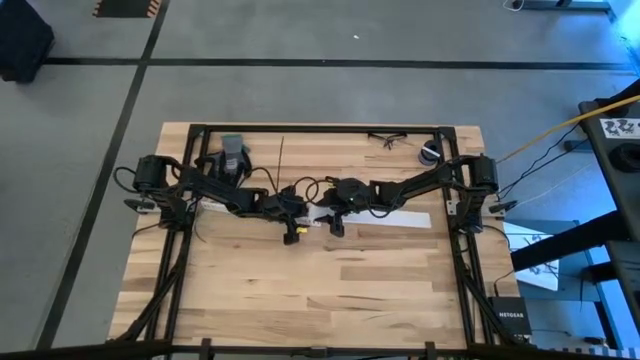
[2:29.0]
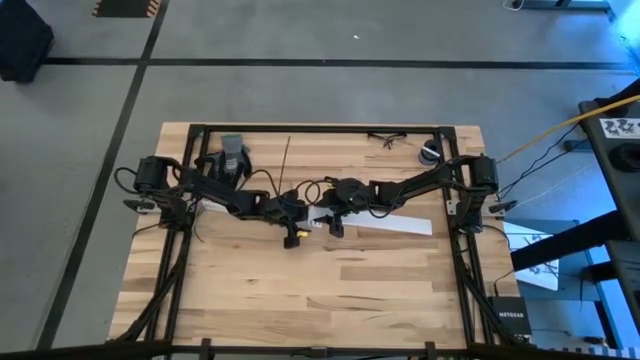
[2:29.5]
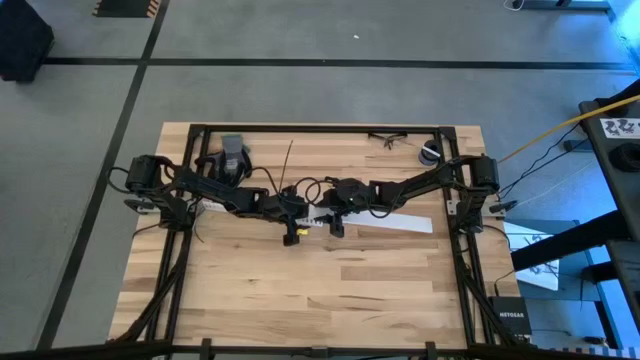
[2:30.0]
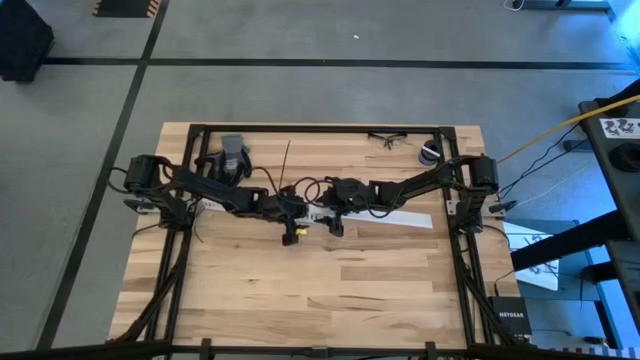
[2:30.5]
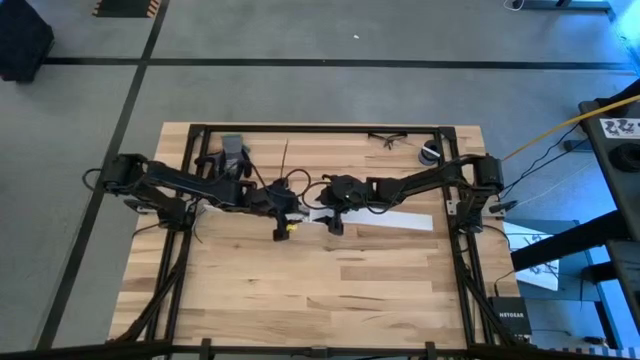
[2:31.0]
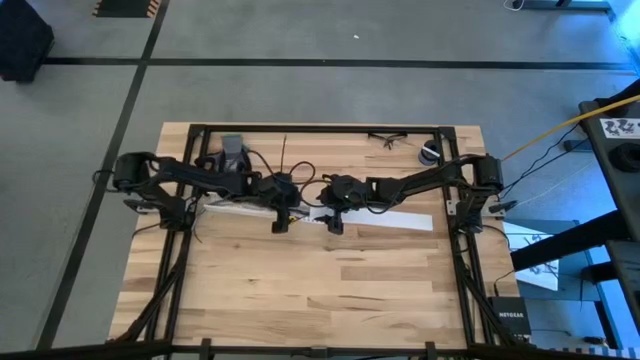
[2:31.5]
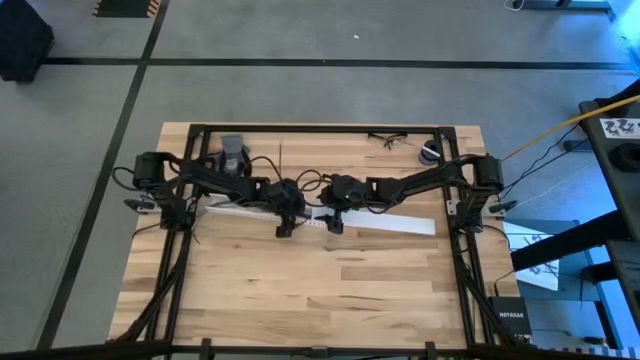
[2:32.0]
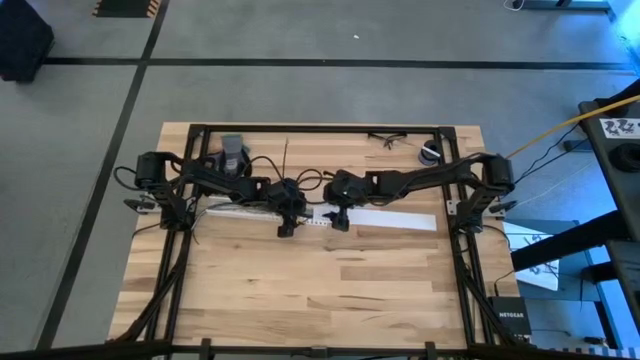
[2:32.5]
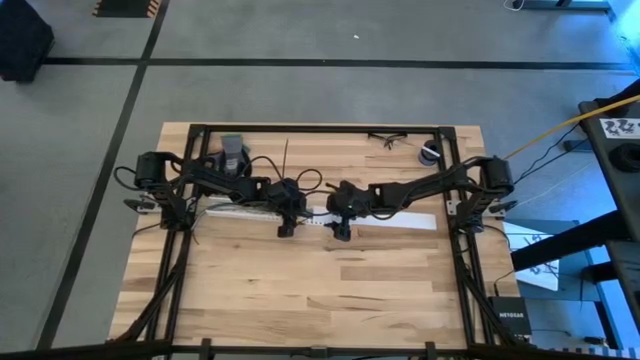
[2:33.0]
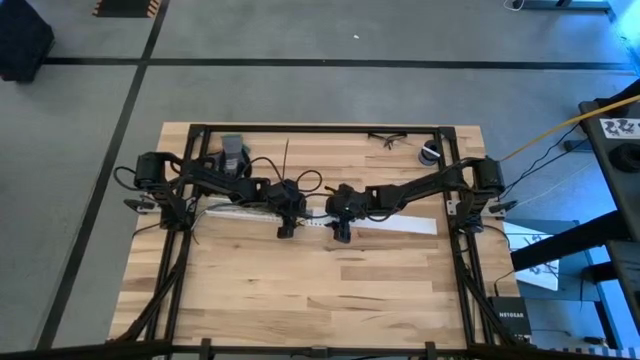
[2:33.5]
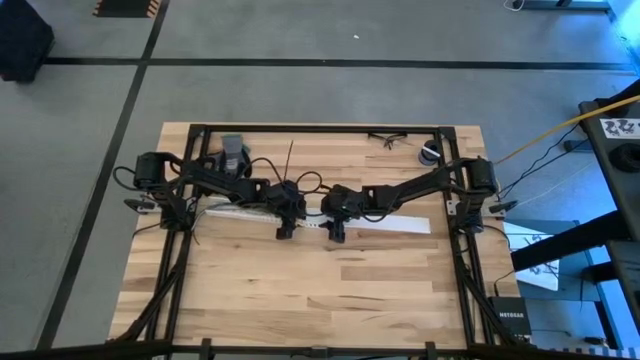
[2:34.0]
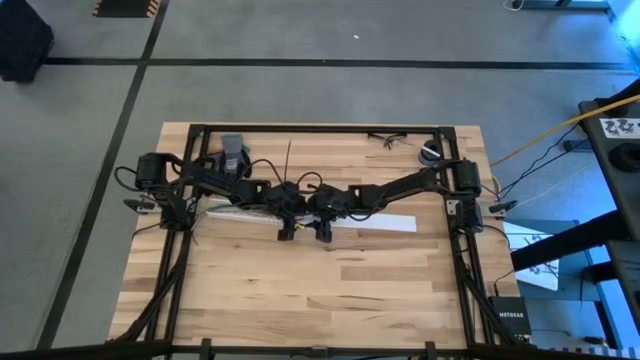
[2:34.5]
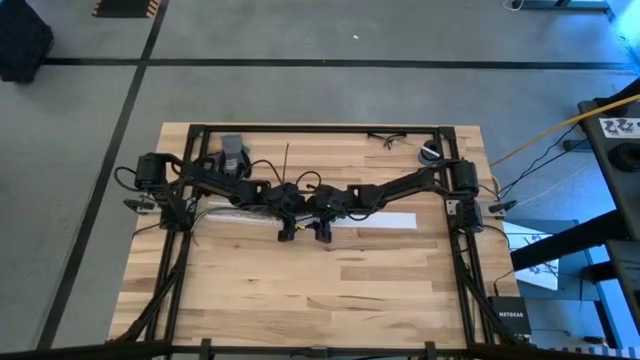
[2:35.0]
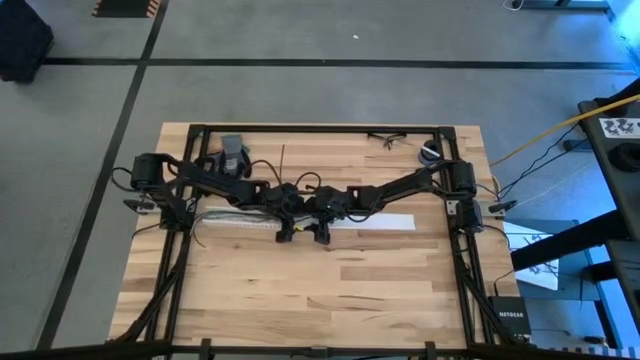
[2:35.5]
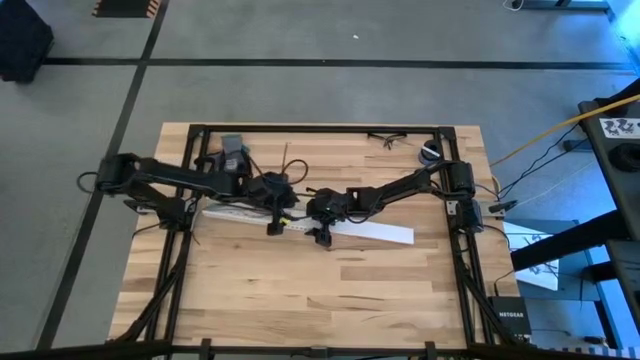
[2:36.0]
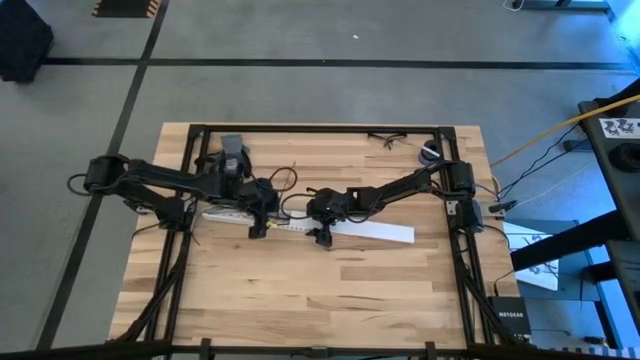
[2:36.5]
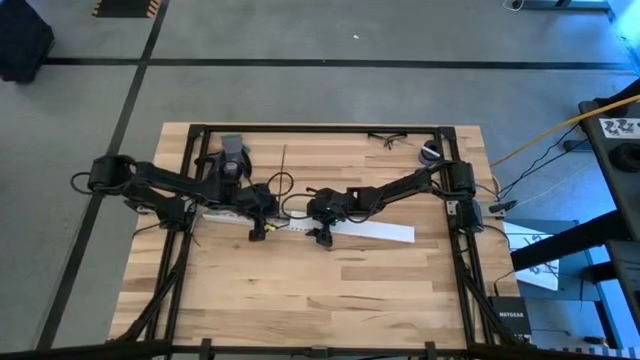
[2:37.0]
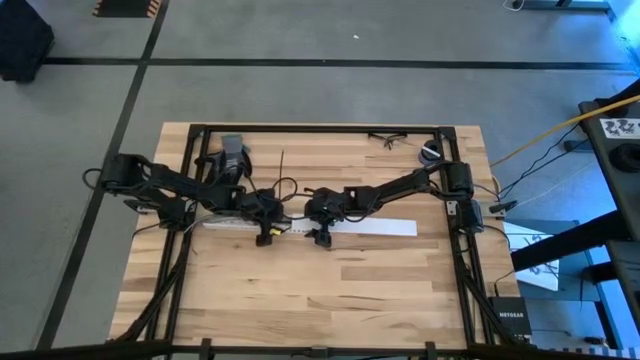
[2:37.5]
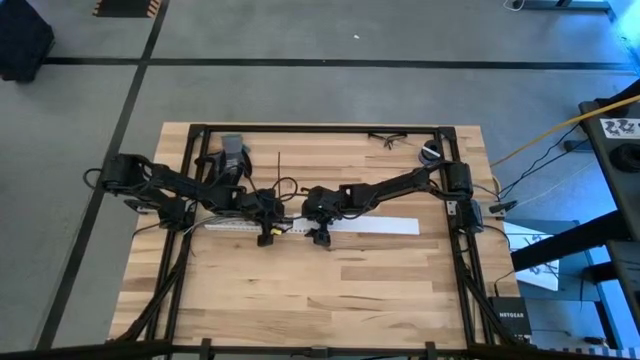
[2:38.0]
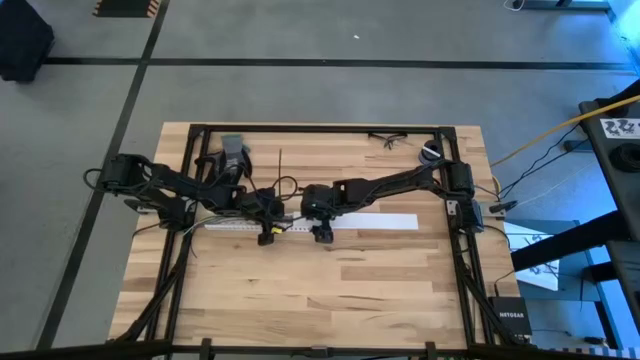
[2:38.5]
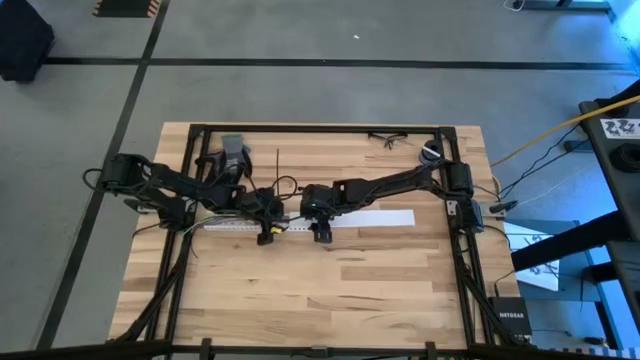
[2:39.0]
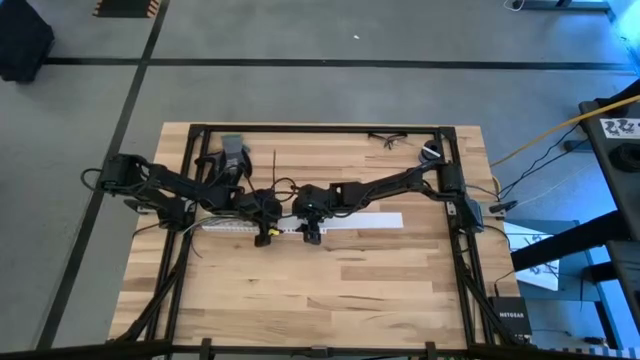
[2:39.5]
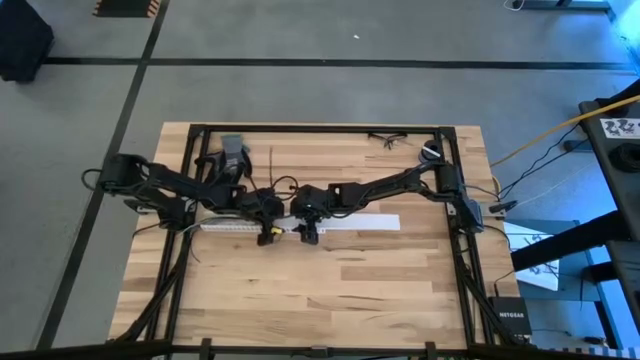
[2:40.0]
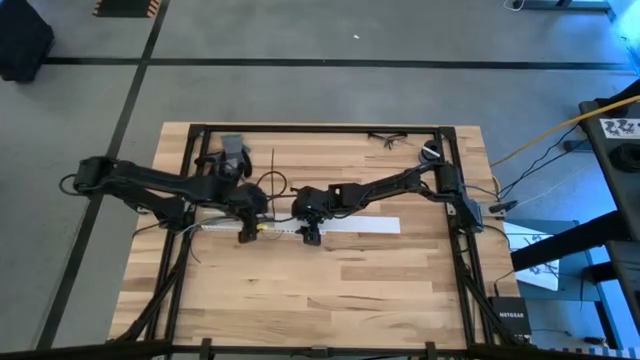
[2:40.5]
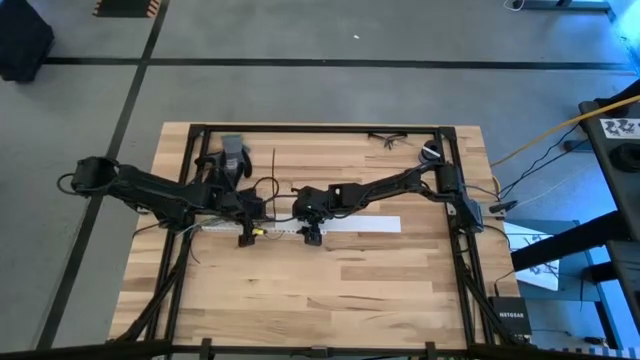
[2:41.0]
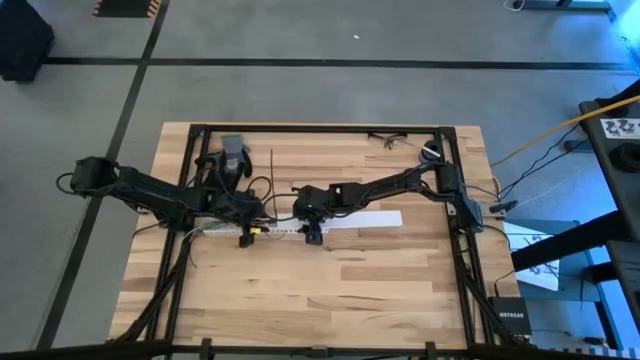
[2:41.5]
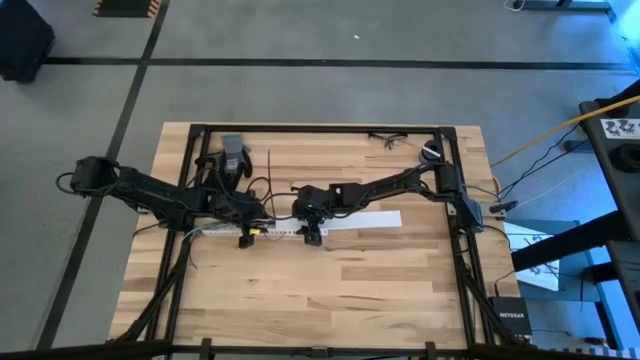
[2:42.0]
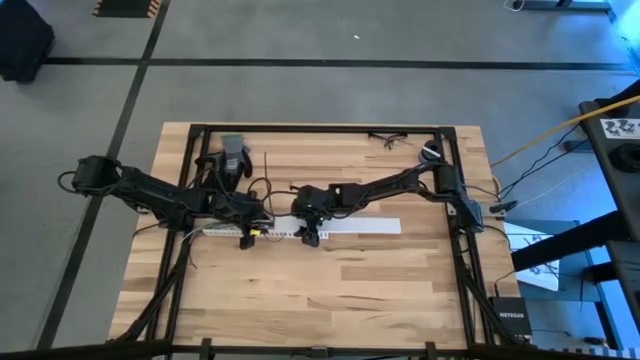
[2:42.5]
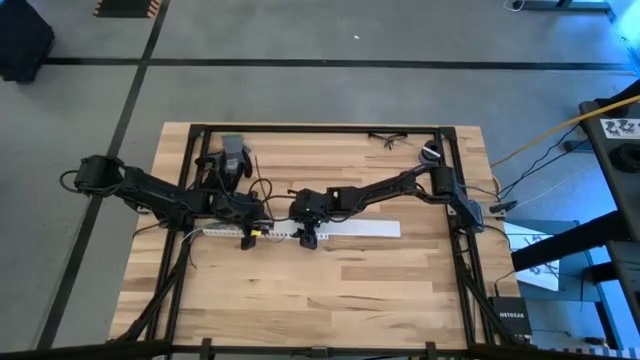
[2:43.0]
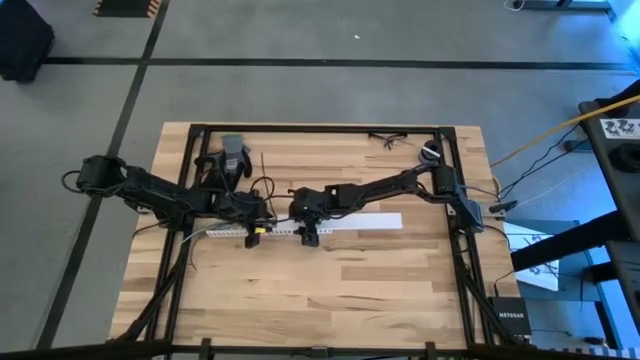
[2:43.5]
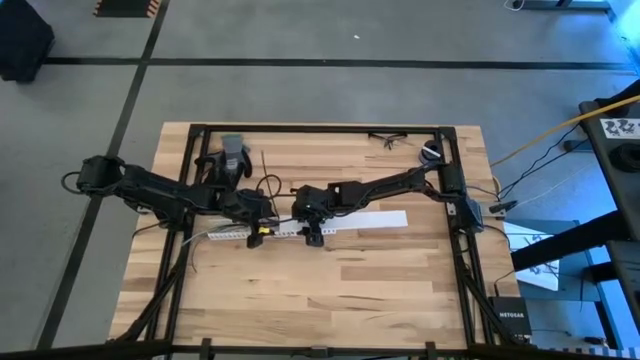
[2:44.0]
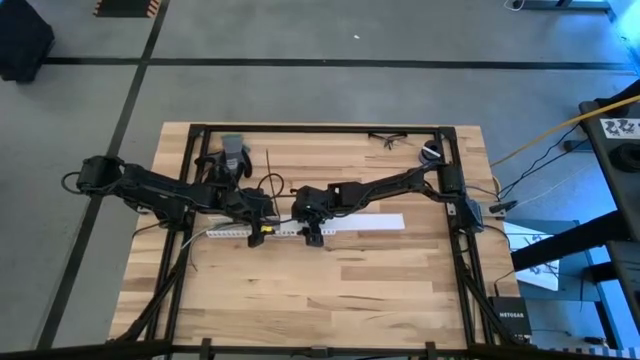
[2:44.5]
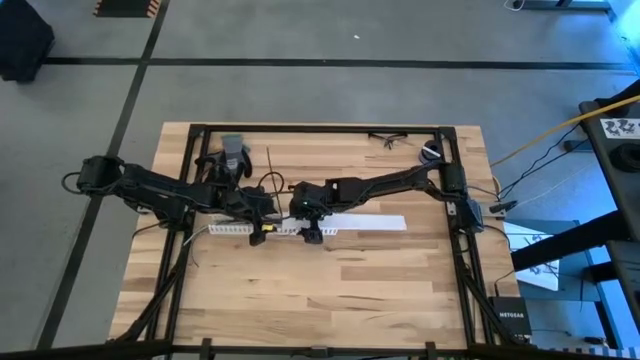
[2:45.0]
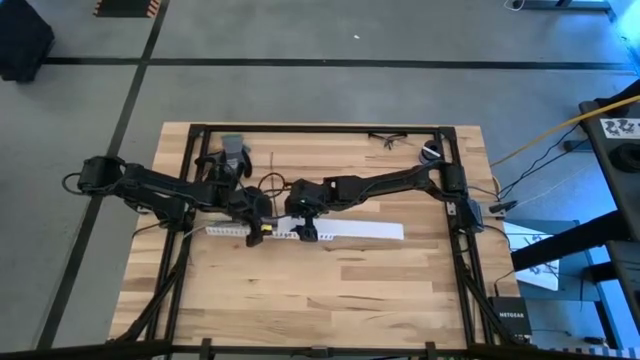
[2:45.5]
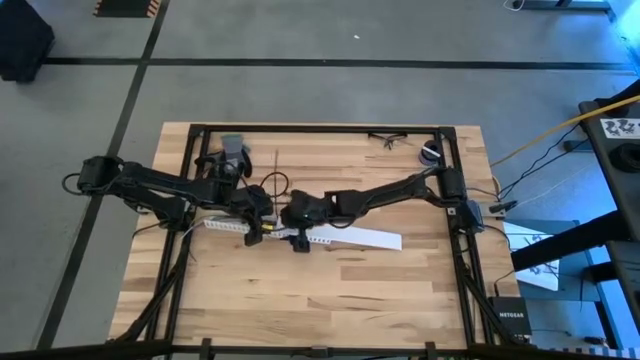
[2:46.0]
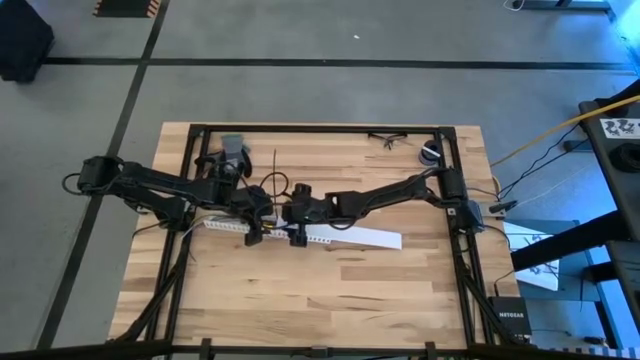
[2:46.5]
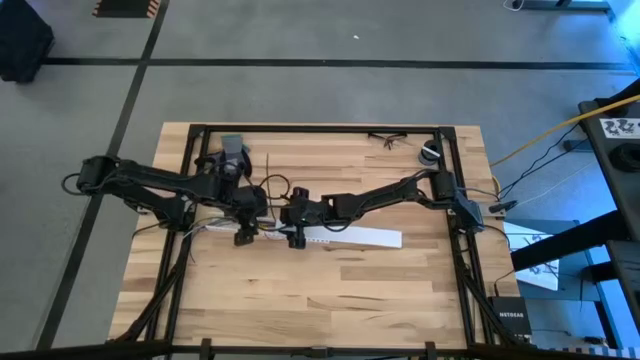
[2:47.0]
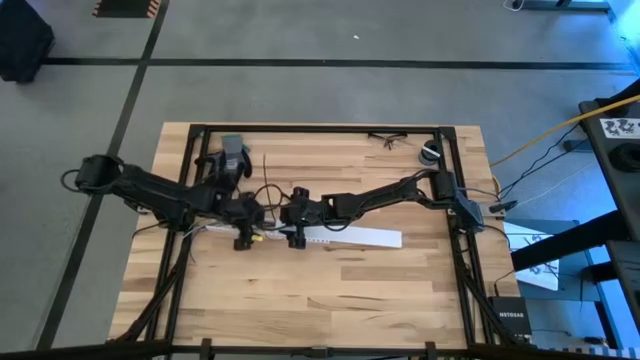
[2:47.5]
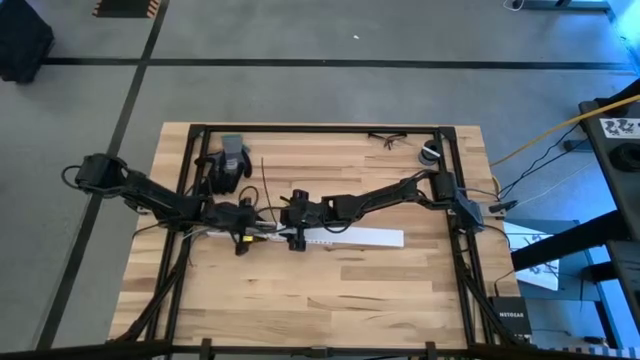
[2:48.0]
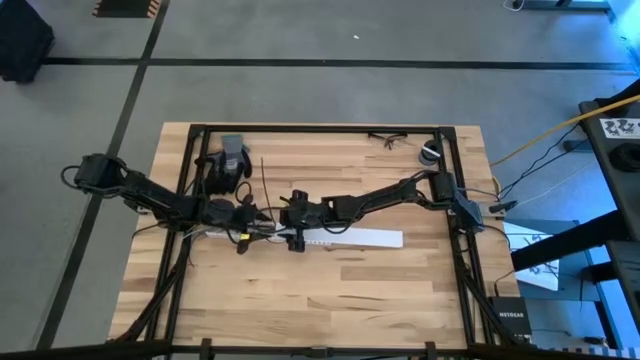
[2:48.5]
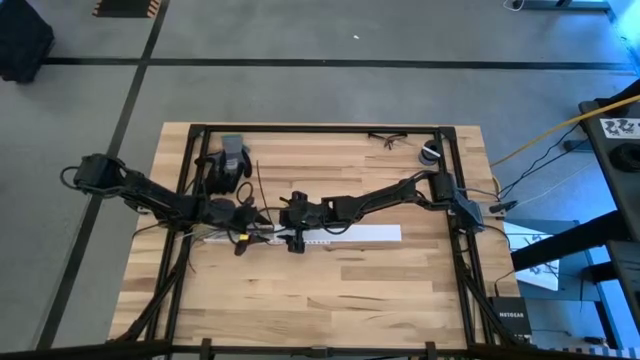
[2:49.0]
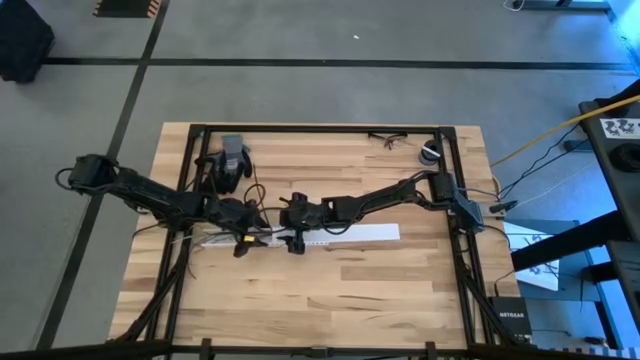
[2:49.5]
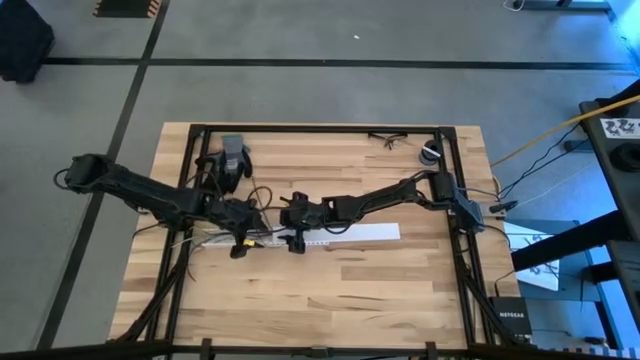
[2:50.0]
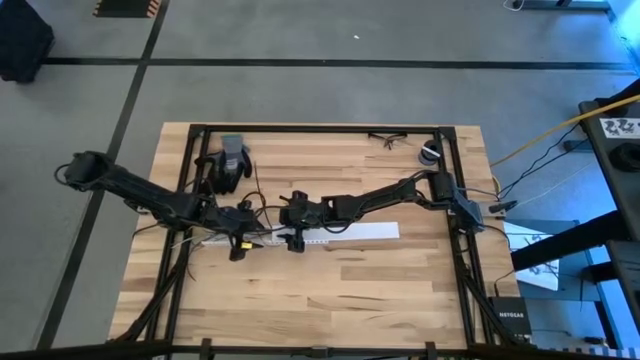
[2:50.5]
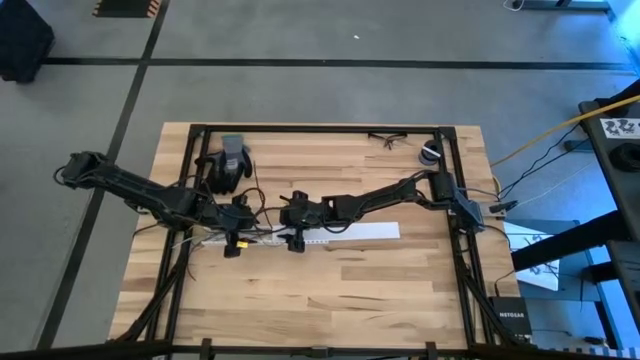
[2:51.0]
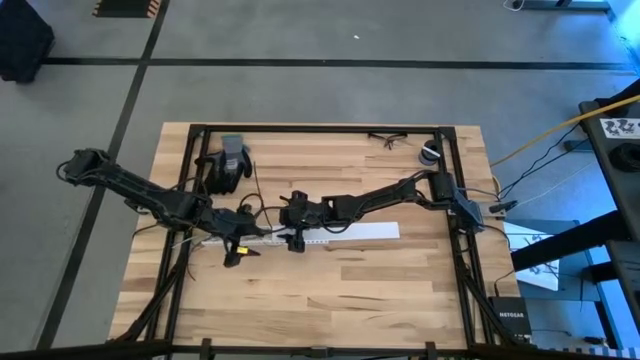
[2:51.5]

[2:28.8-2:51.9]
Task: Ziptie cables
Close the white cable duct with the lid
